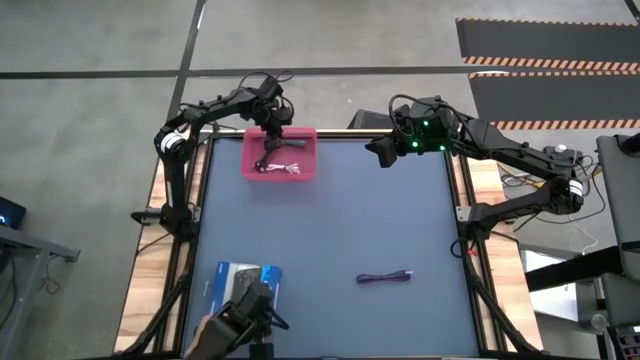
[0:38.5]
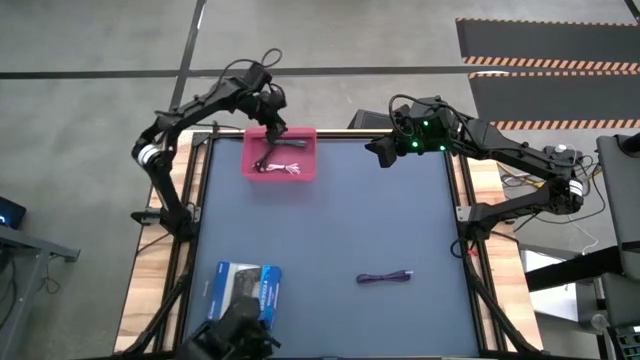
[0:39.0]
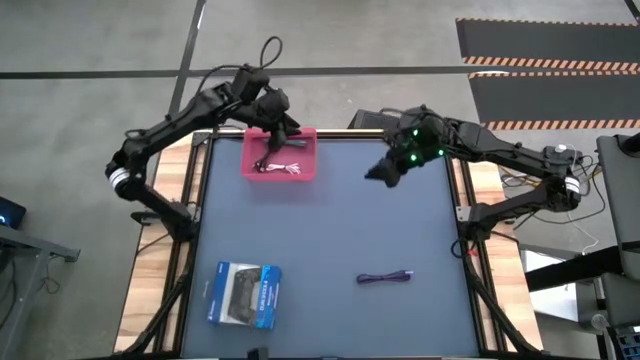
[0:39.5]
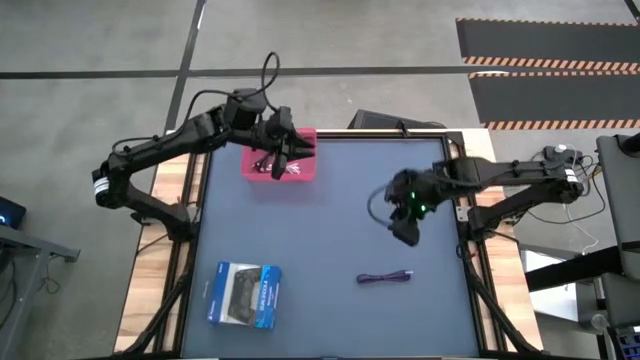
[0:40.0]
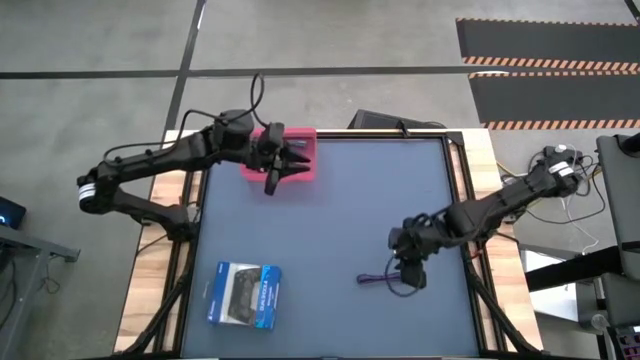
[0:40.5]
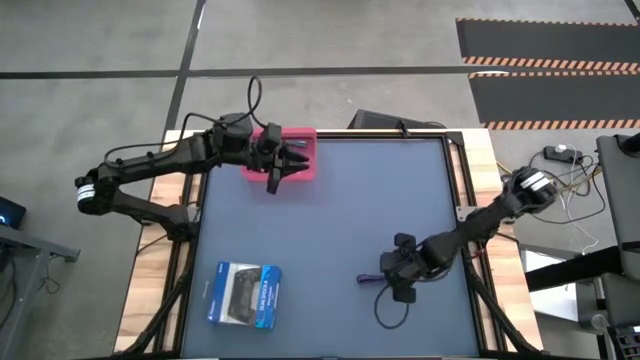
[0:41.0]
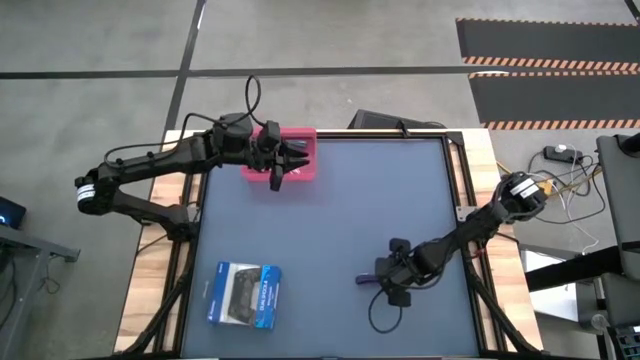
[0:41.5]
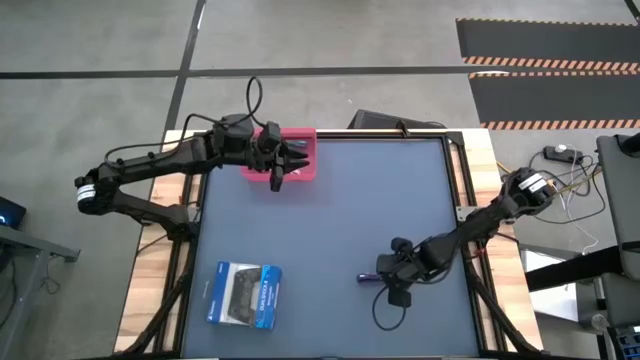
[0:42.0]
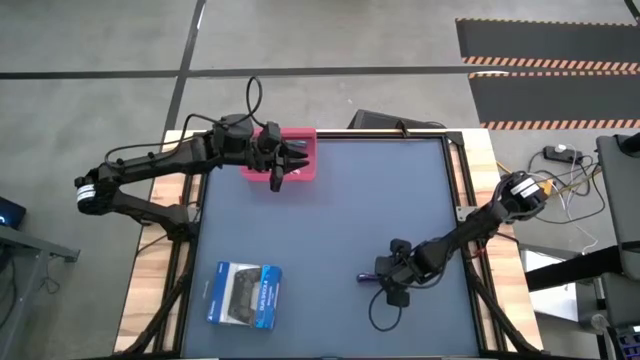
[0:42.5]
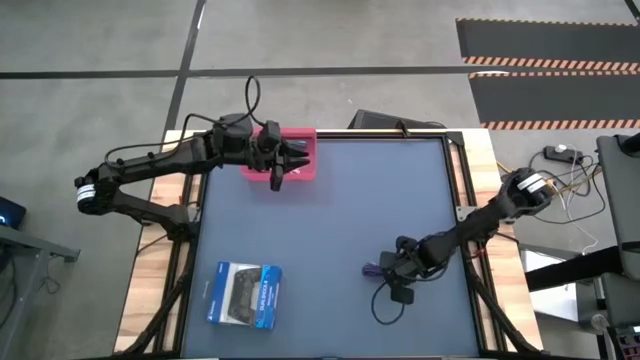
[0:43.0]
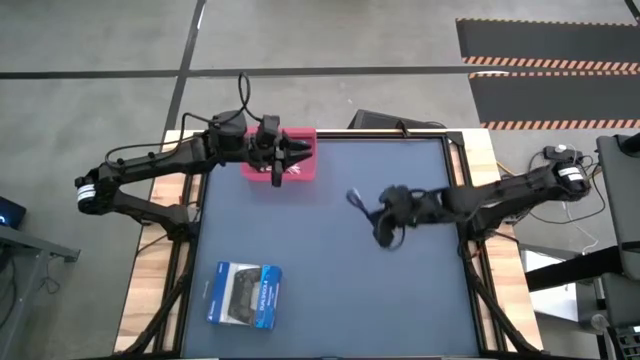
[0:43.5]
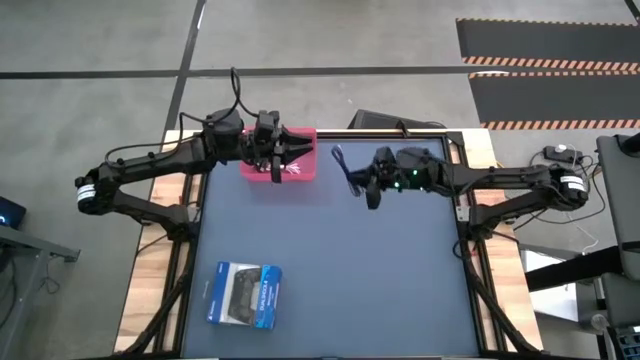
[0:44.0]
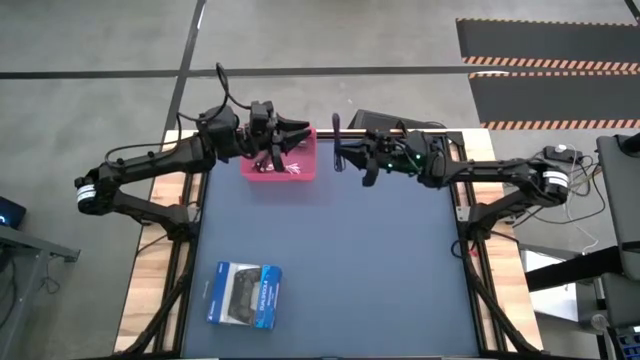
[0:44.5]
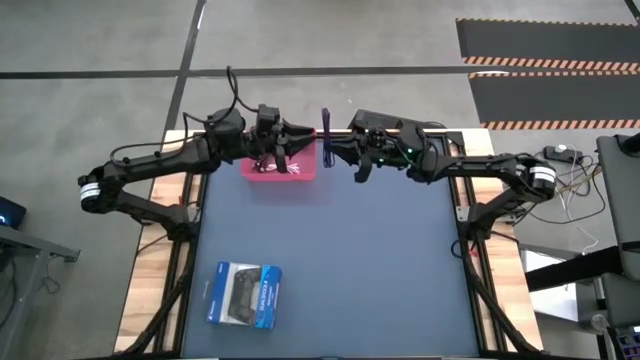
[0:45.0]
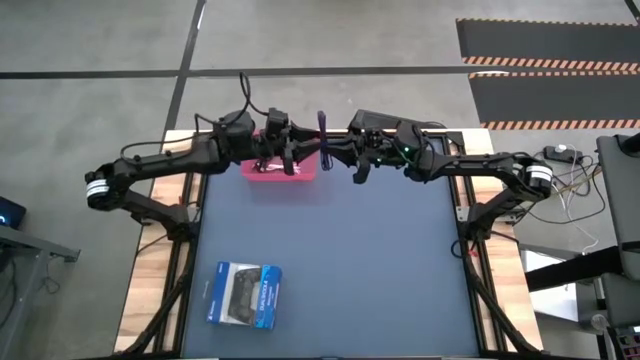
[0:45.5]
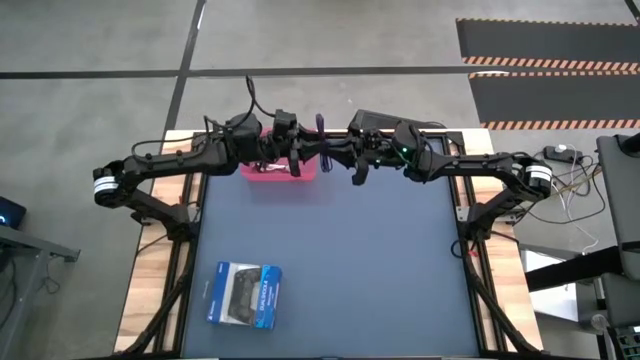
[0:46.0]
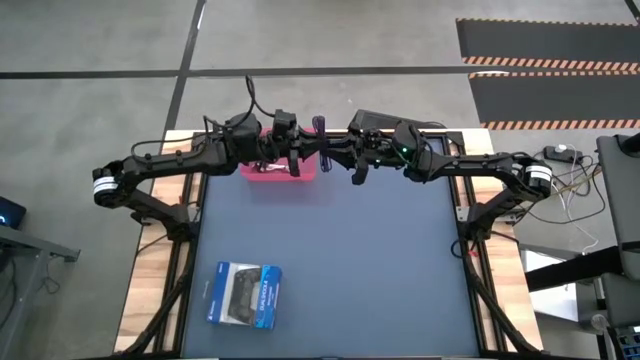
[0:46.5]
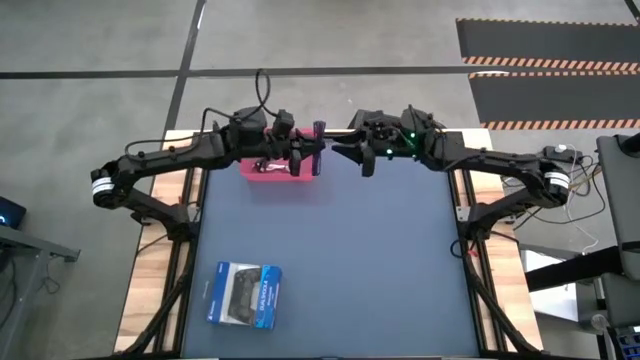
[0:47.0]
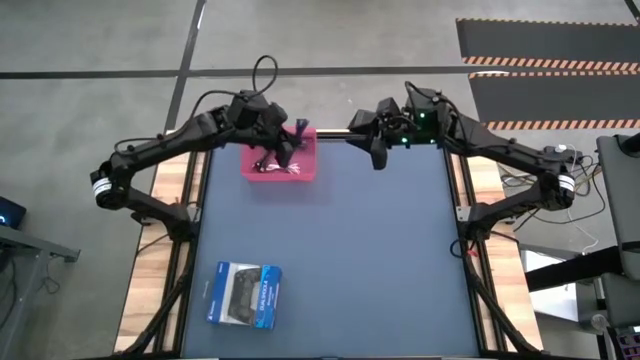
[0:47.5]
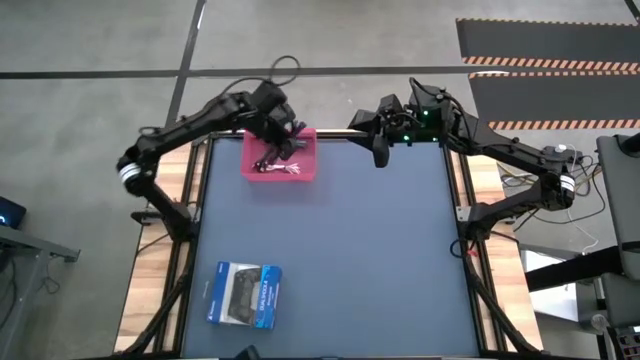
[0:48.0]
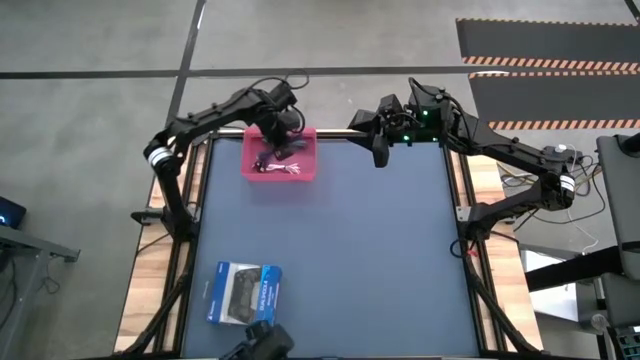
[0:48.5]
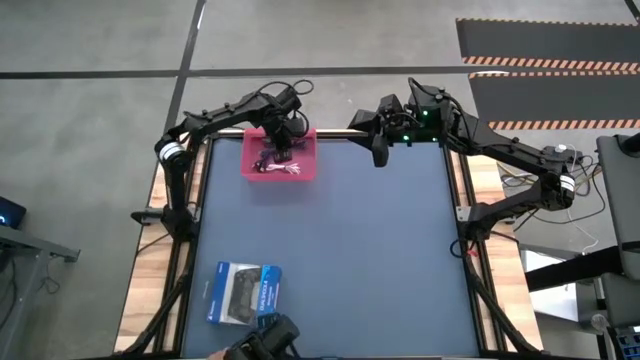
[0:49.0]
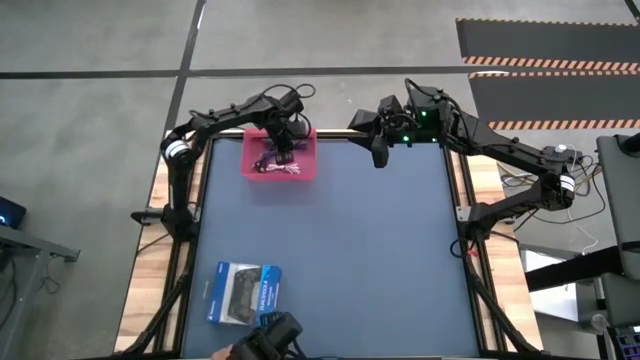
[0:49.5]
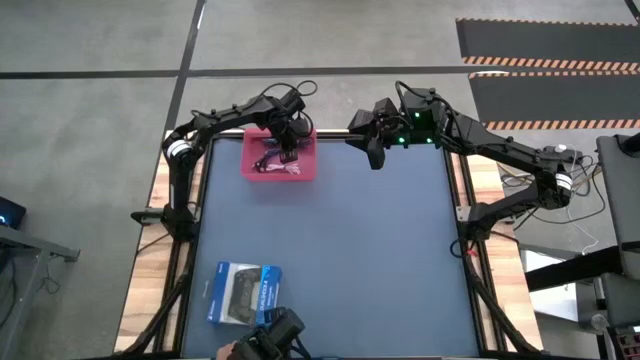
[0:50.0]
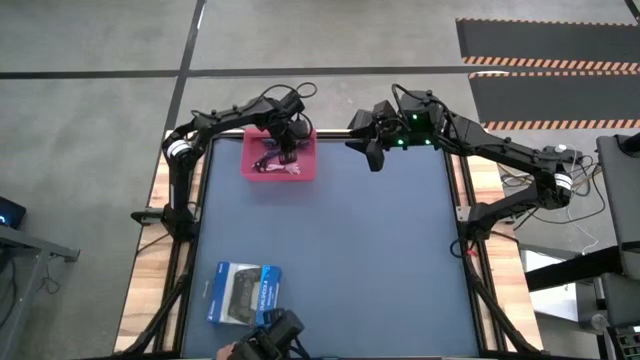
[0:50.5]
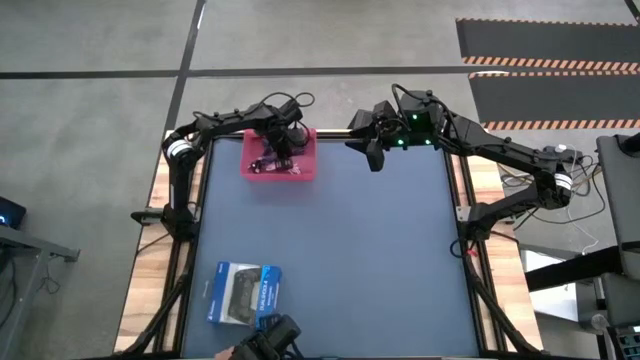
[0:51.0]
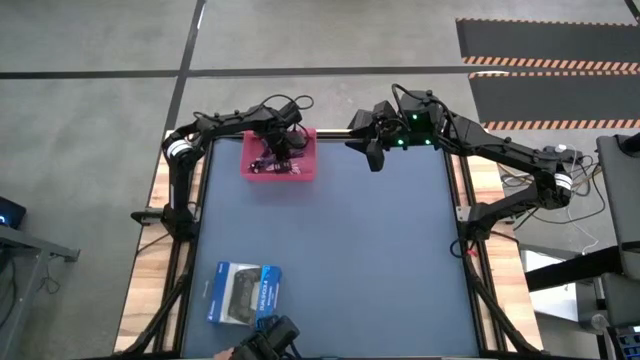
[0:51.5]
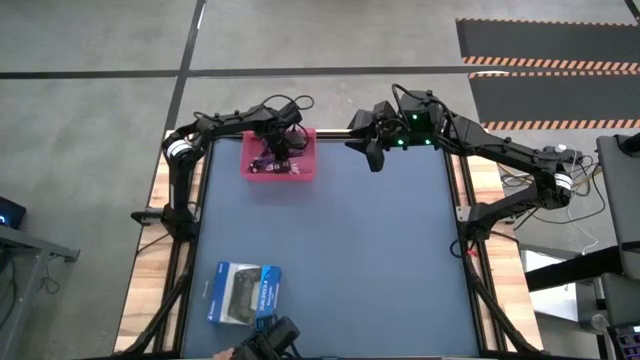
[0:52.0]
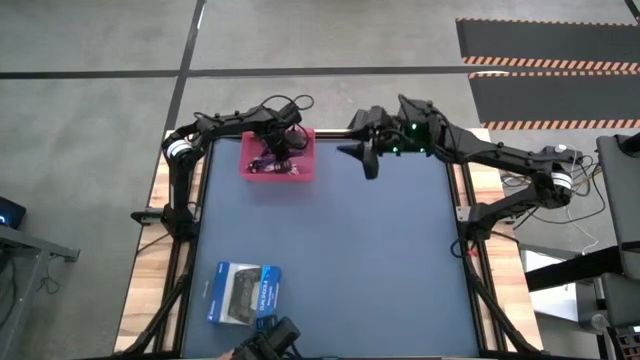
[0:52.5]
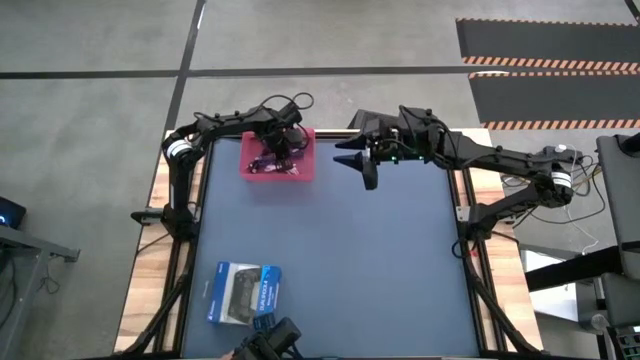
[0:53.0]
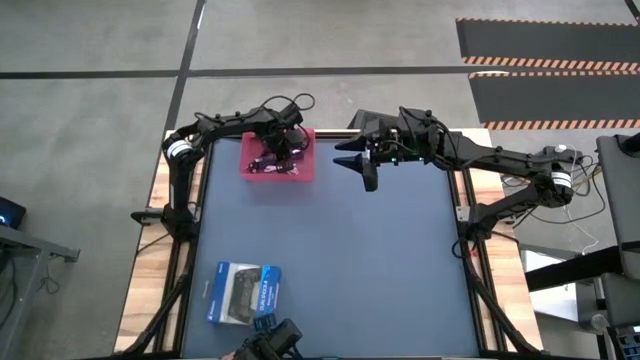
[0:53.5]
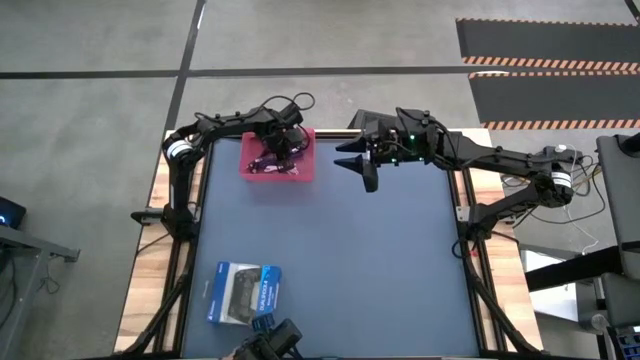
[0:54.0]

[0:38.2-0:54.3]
Task: Pick and place USB-C Cables
Put the violet charger cable into the pink bin

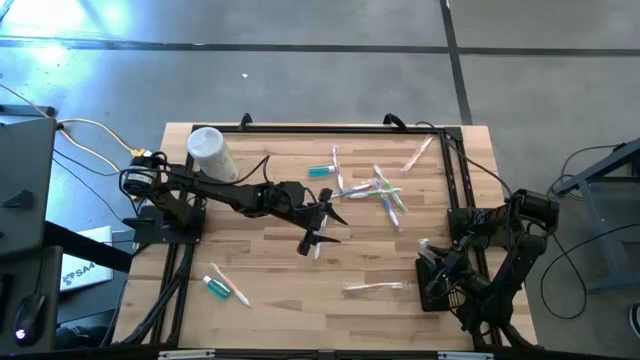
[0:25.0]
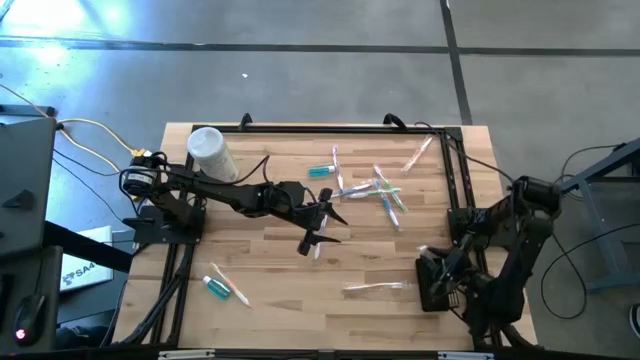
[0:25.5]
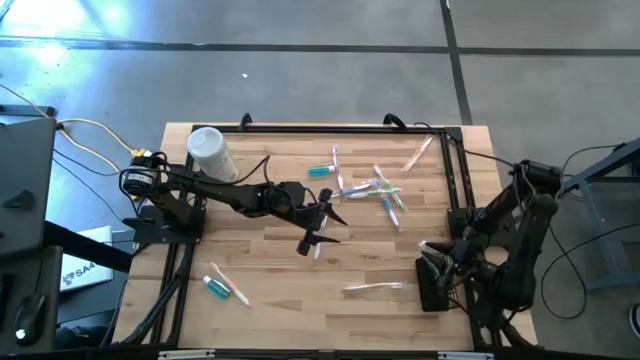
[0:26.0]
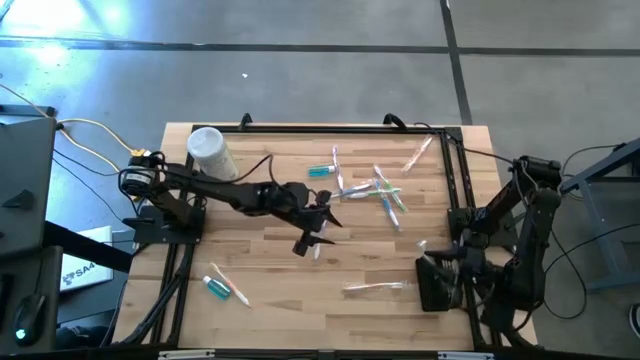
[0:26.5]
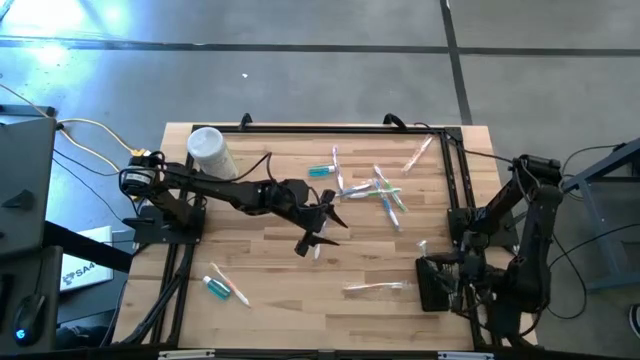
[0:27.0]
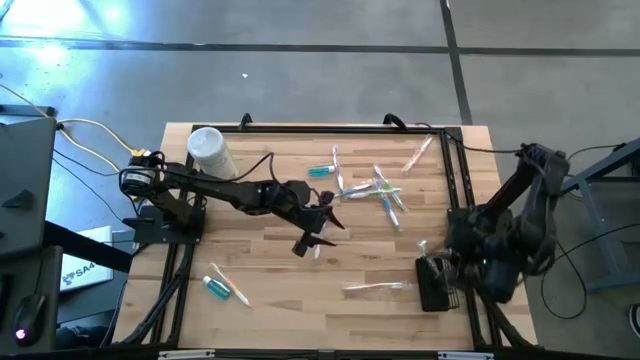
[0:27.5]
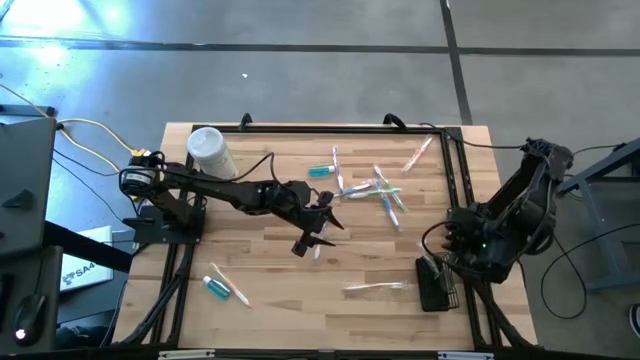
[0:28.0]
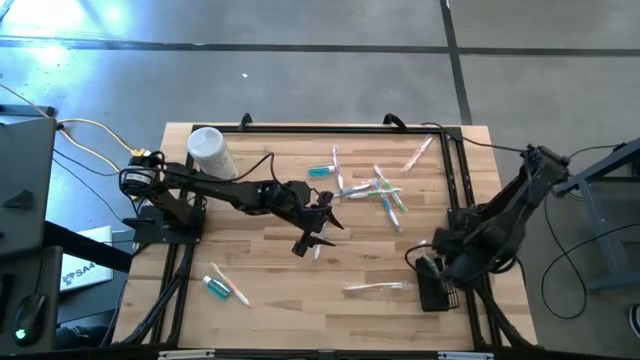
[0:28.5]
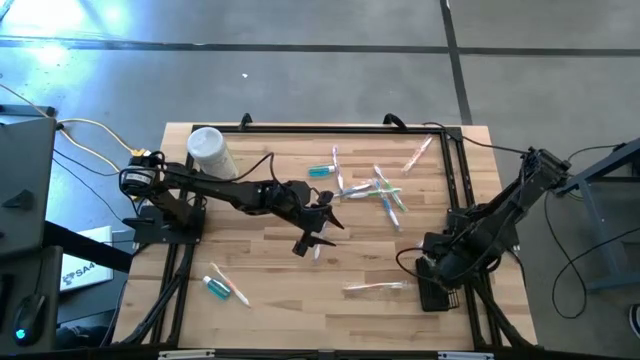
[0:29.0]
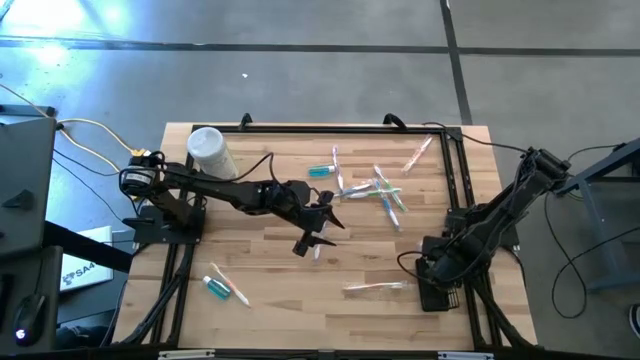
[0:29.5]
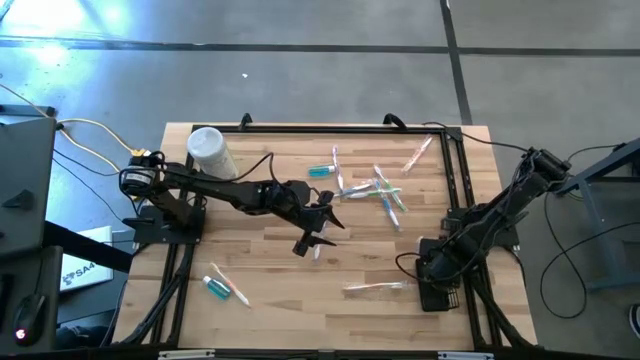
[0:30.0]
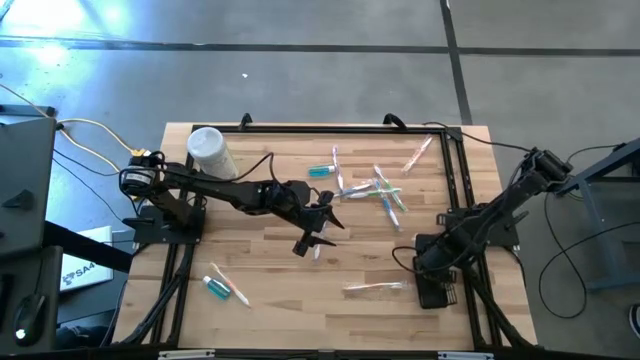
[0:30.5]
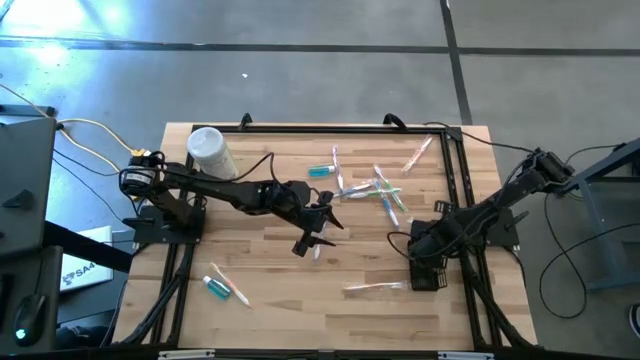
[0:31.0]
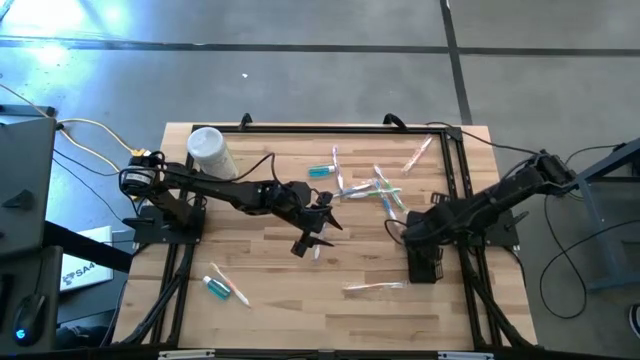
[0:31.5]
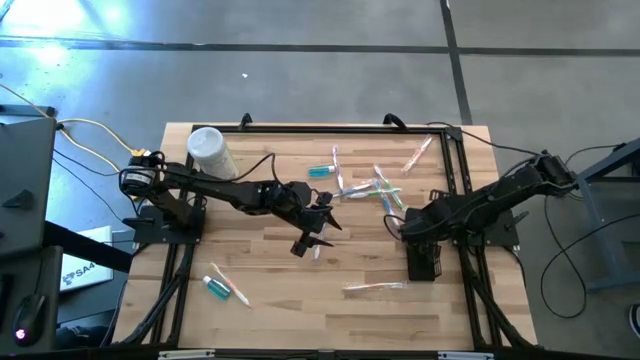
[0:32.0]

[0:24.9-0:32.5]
Task: Pick & Place toothbrushing station
Adjust the black mesh organizer on the table
